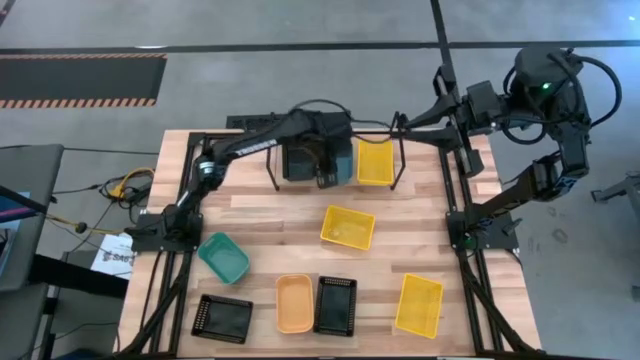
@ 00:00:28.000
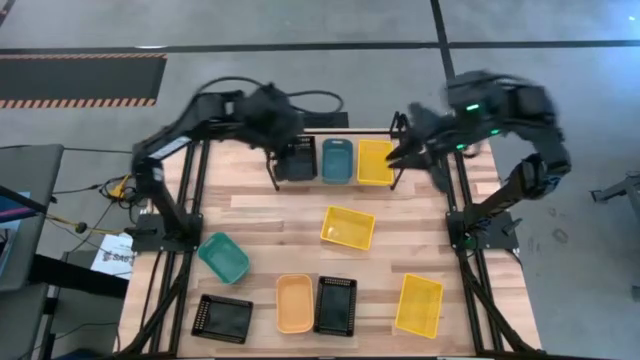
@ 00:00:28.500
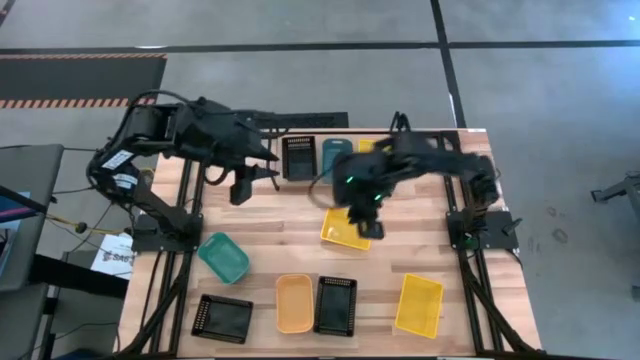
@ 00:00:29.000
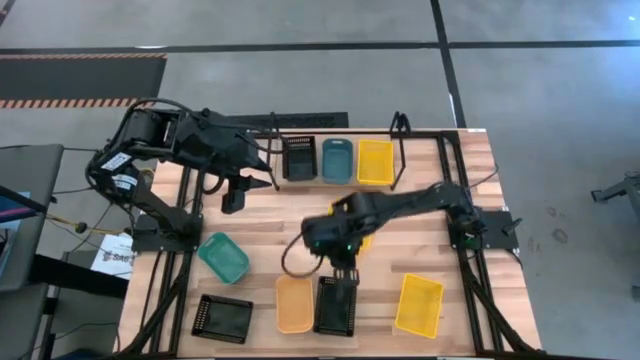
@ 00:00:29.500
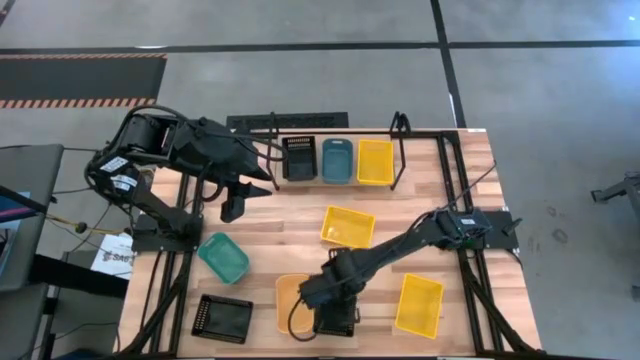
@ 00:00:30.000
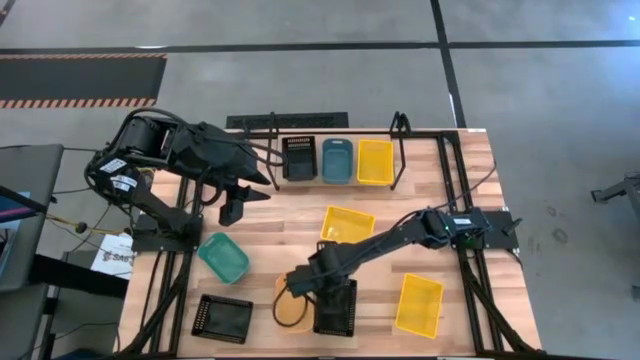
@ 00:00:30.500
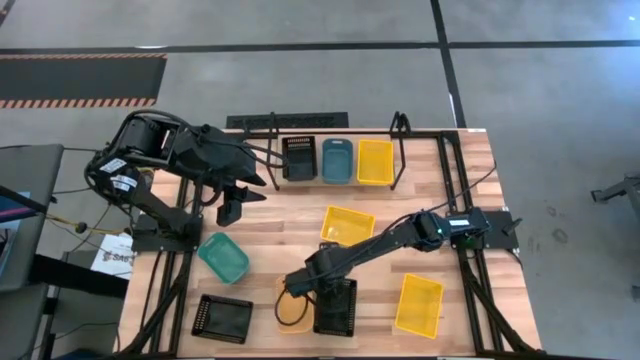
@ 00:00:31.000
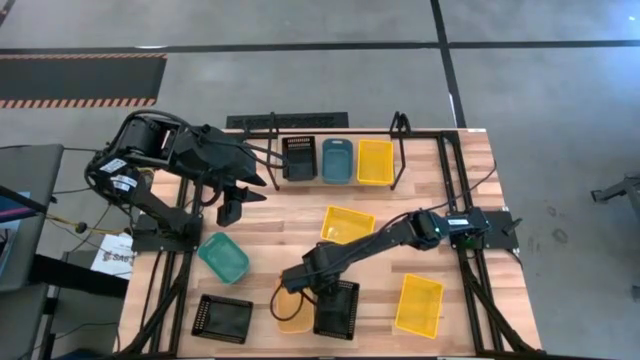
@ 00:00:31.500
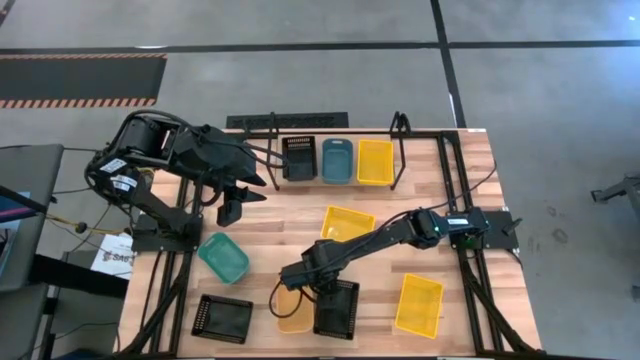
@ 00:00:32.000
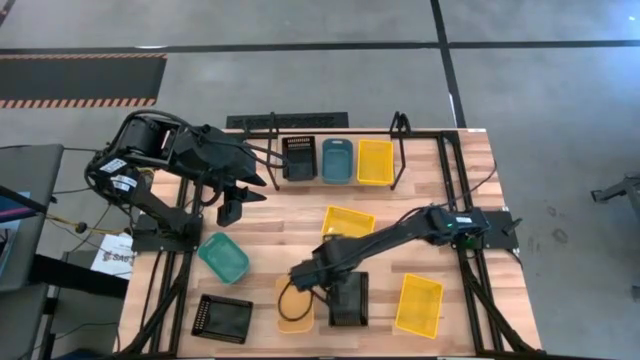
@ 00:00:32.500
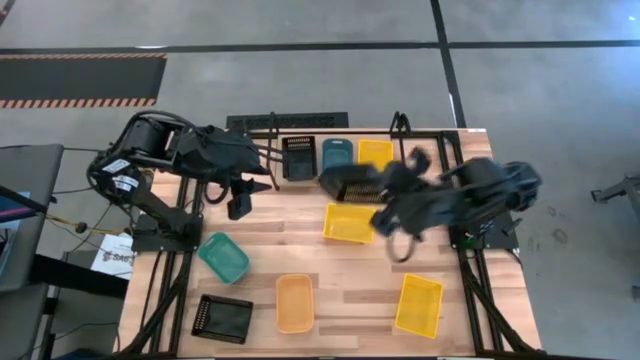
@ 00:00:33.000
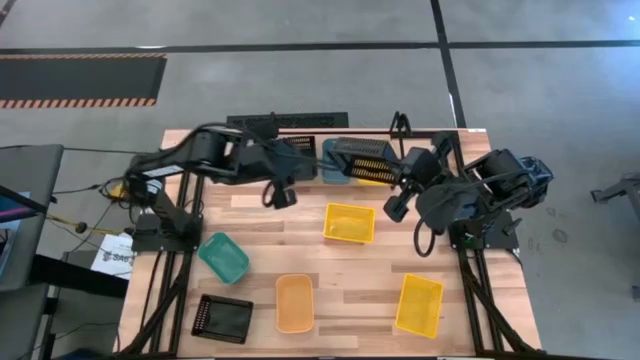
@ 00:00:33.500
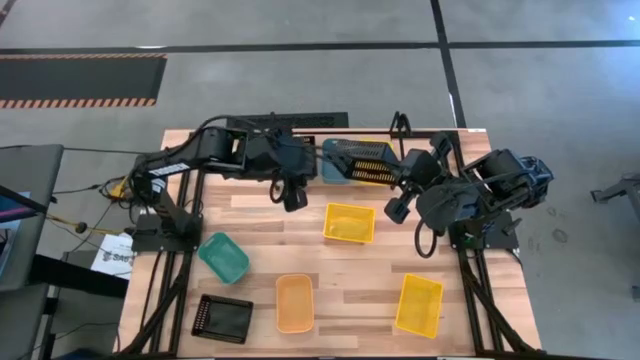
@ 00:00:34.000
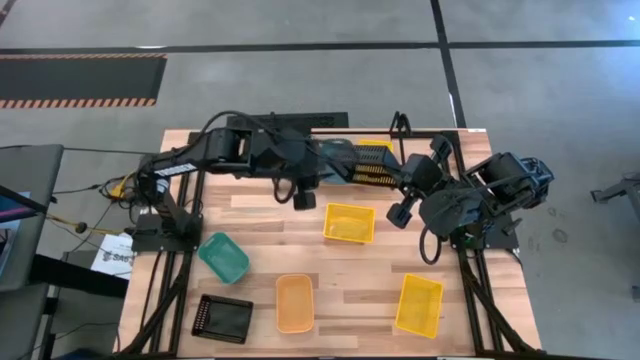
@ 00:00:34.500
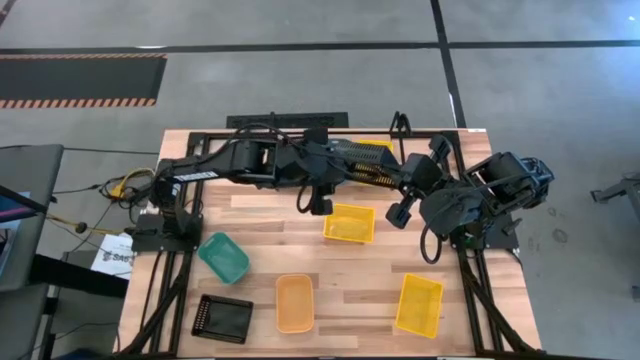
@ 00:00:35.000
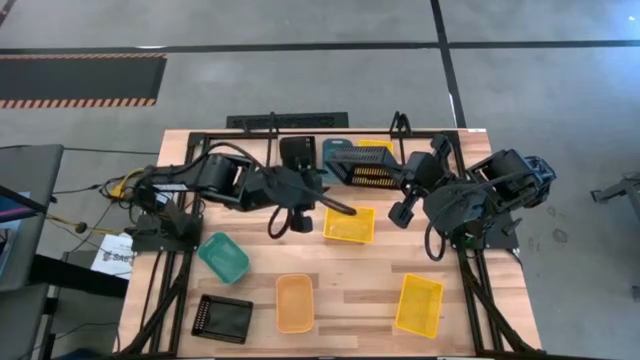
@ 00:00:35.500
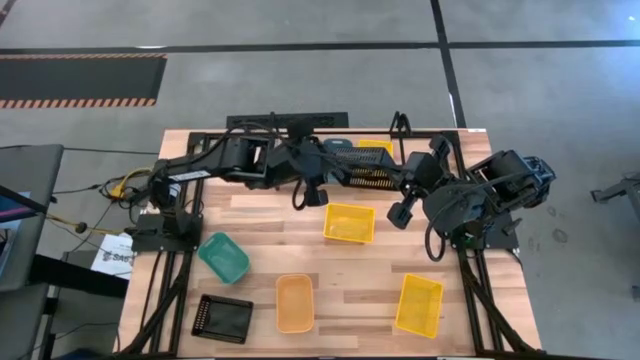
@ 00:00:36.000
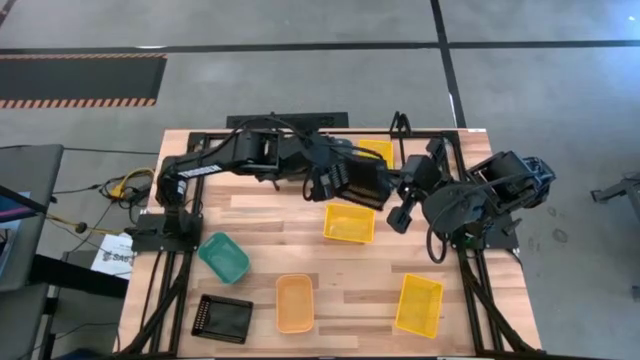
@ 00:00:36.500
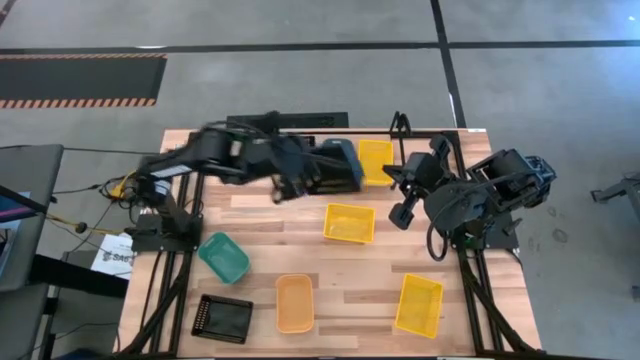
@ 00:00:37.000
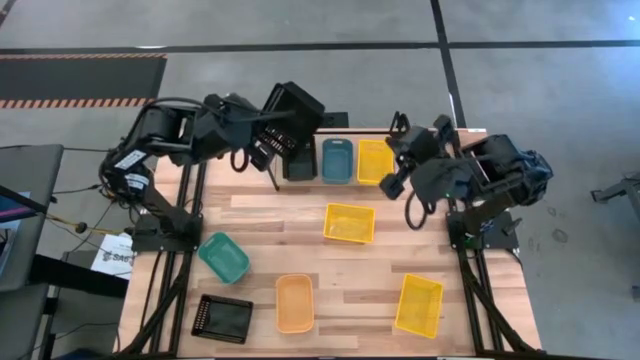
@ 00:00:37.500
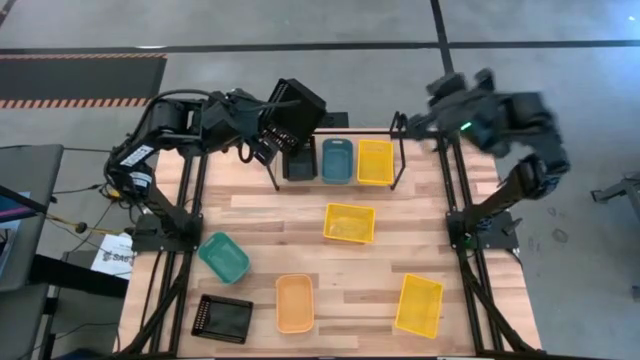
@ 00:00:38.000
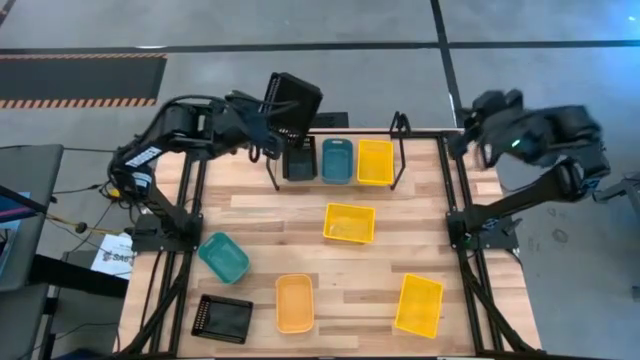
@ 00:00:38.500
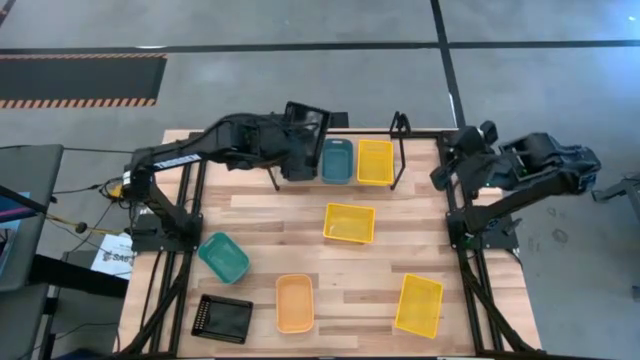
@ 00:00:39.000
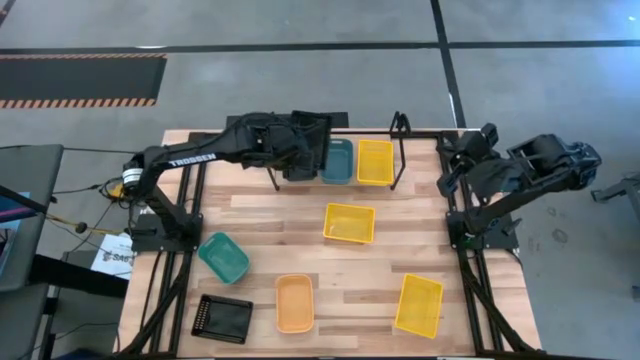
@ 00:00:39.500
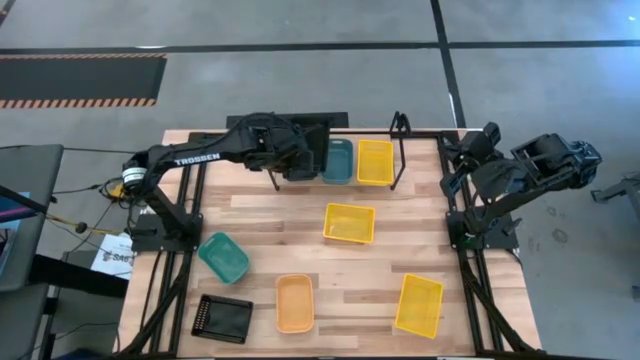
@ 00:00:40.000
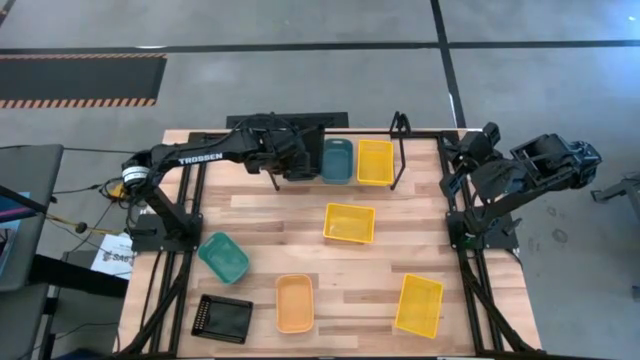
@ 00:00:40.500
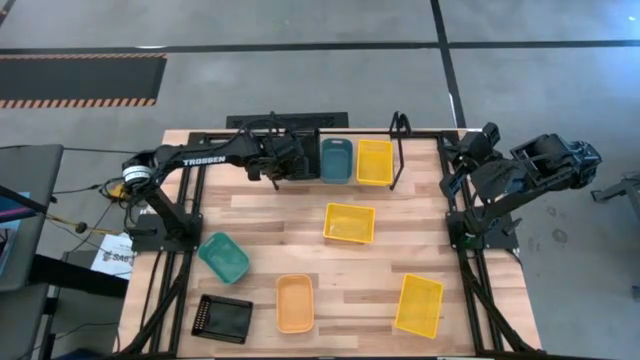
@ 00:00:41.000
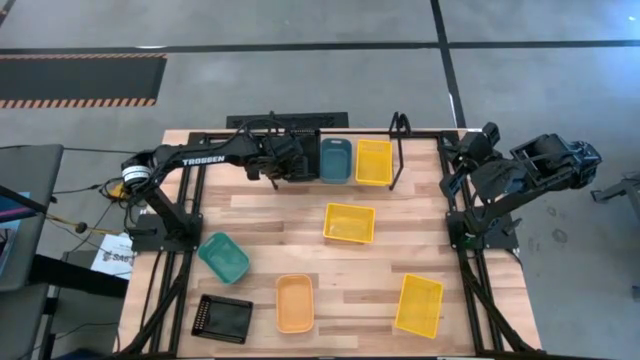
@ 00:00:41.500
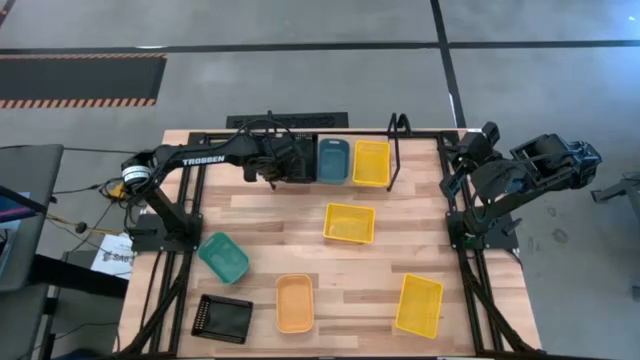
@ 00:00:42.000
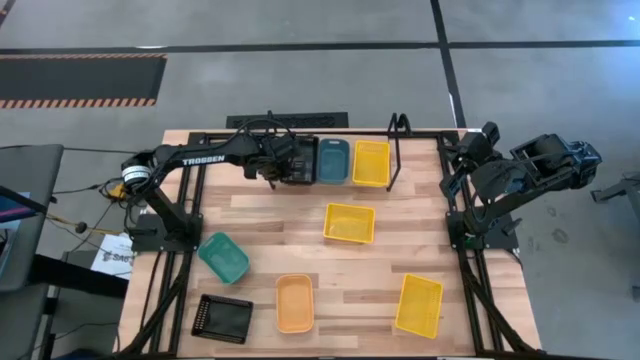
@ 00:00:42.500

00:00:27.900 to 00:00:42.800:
Task: Stack baskets on shelf by color
Stack the right black bin on the black bin

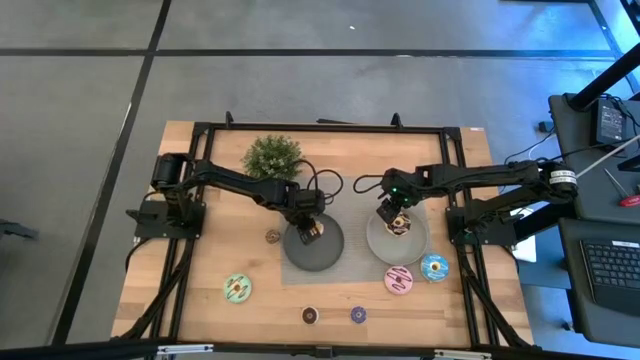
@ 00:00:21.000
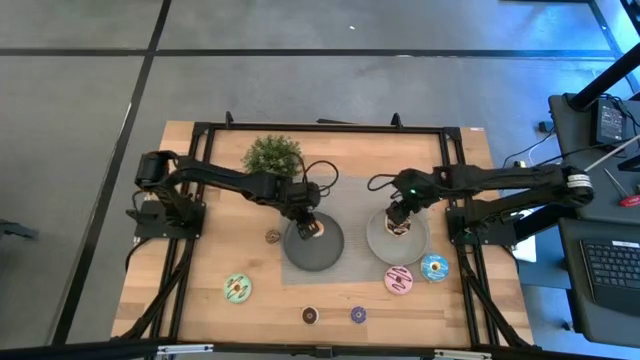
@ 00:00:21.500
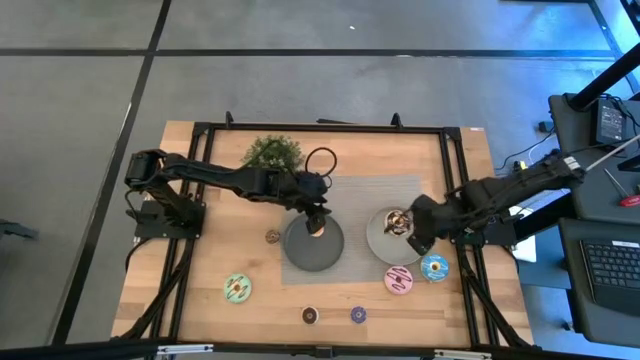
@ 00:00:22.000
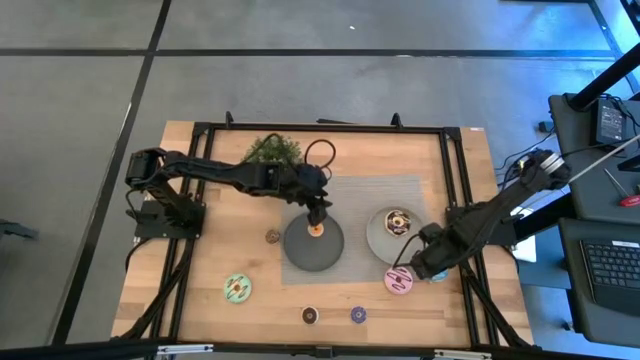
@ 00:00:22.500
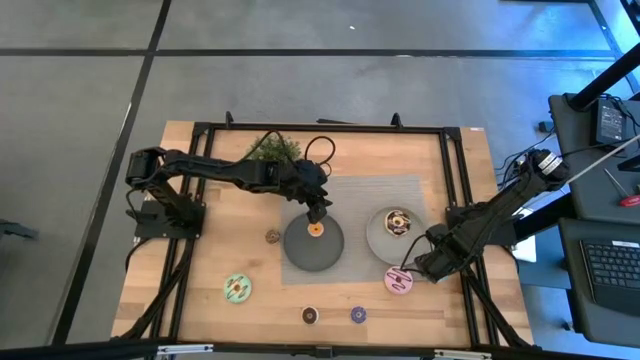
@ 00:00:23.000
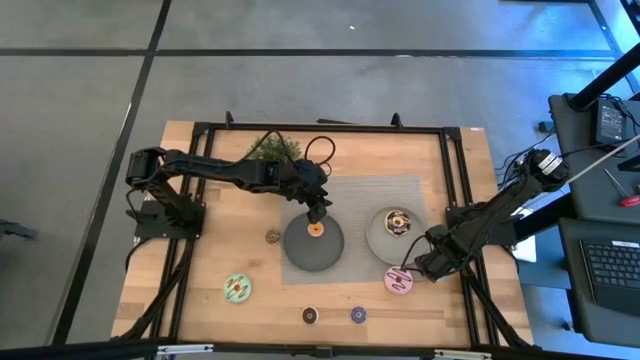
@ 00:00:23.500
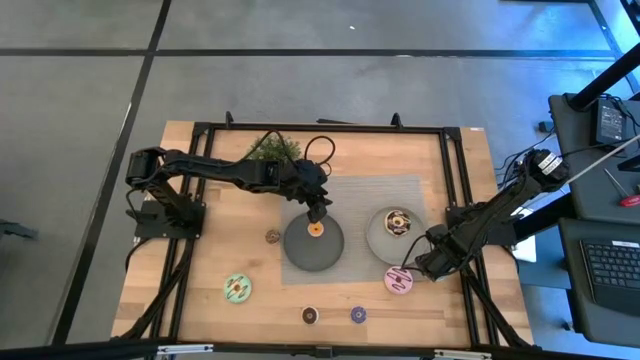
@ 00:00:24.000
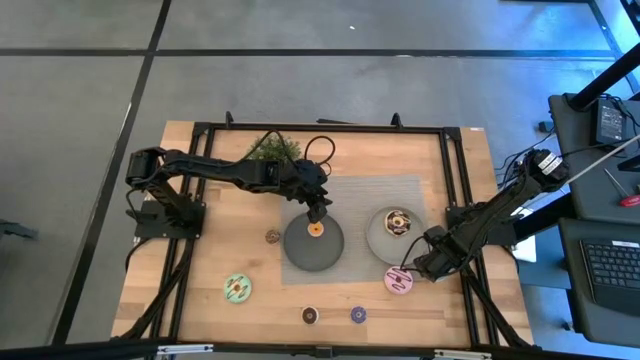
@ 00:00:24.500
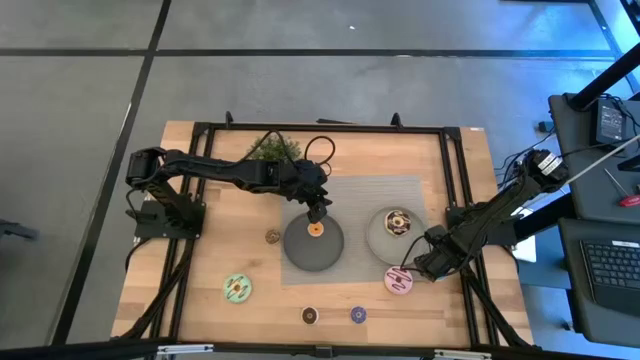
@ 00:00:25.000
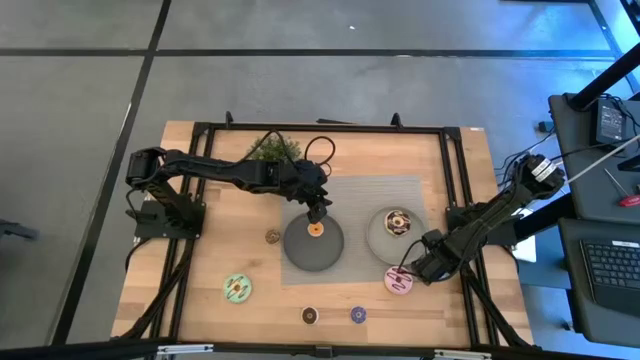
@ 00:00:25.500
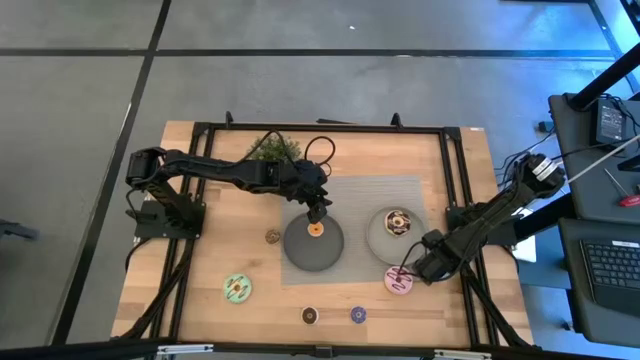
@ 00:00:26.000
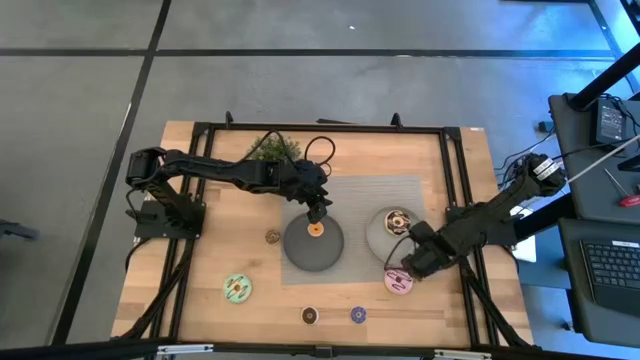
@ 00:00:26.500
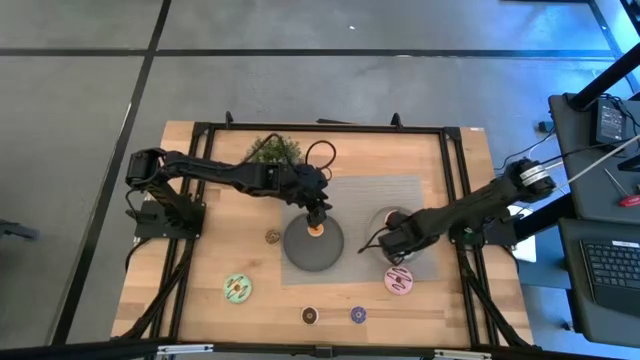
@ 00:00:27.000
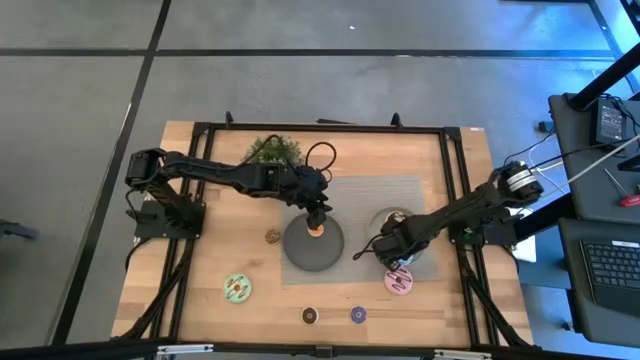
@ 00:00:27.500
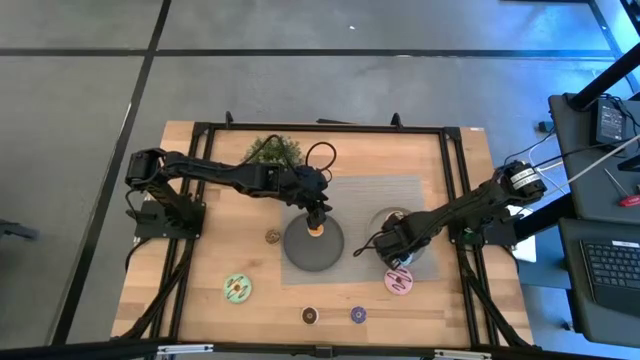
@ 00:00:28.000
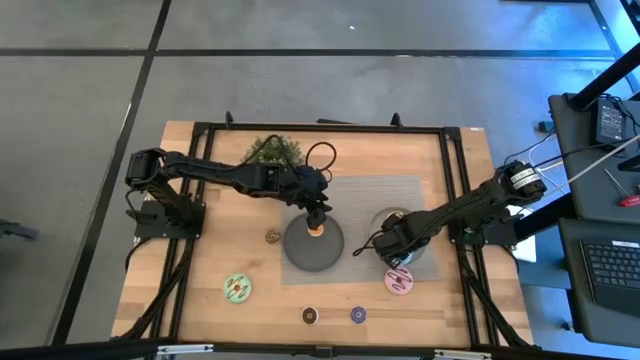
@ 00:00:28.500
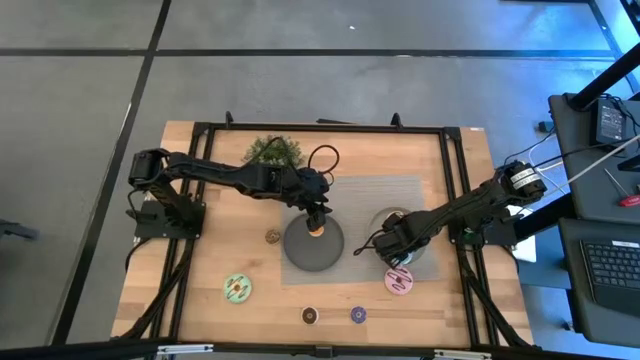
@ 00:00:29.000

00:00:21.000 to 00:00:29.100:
Task: Pick & Place donuts
Put the large blue donut on the light gray plate
